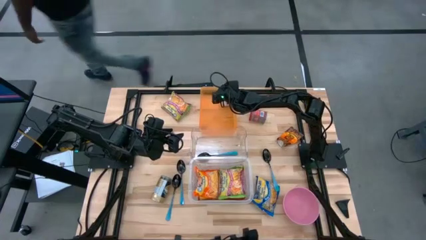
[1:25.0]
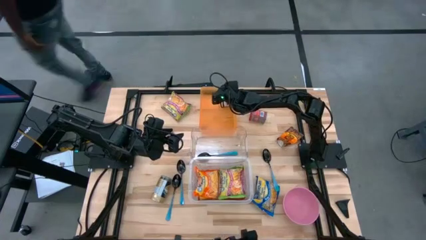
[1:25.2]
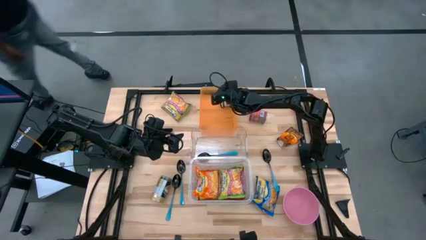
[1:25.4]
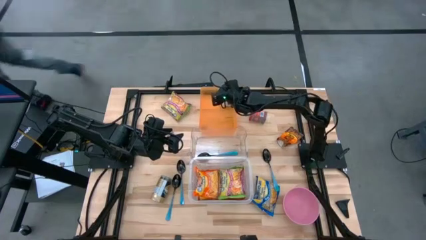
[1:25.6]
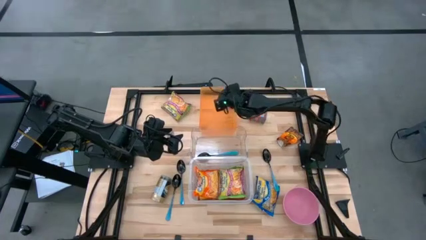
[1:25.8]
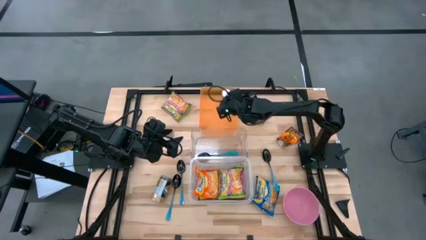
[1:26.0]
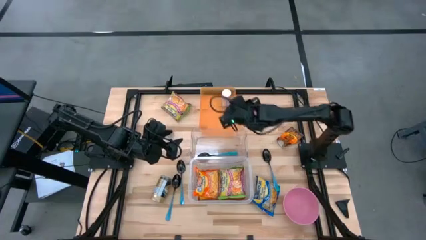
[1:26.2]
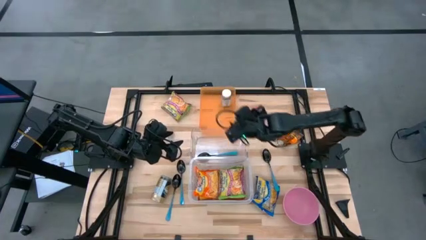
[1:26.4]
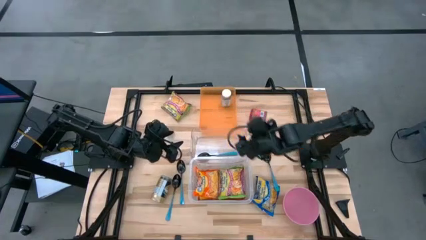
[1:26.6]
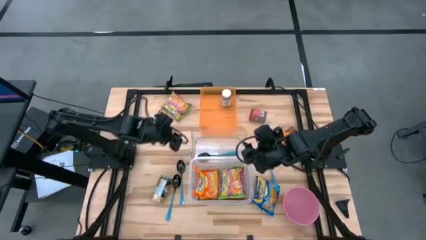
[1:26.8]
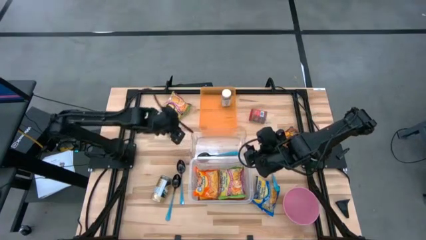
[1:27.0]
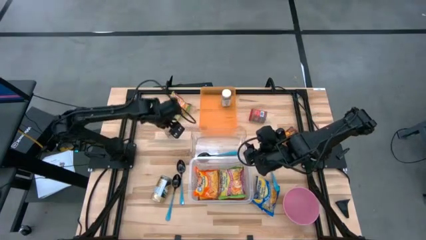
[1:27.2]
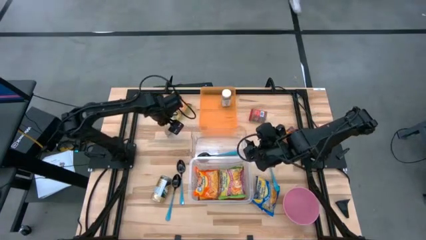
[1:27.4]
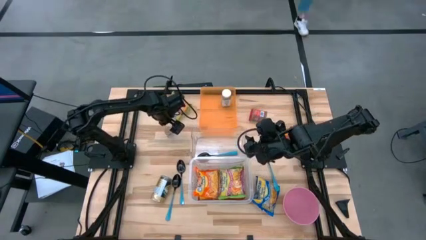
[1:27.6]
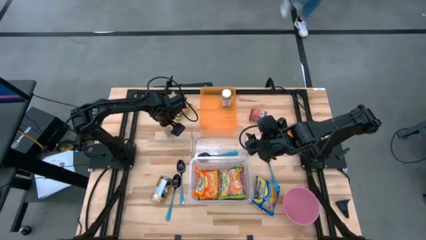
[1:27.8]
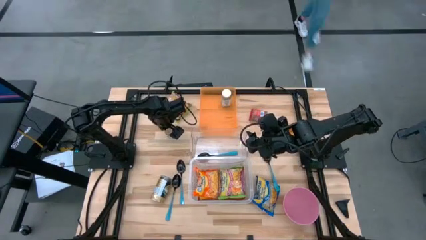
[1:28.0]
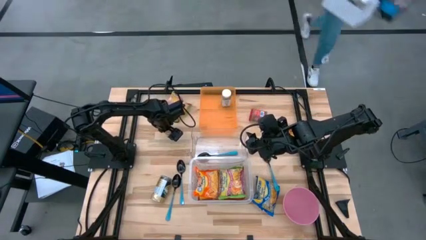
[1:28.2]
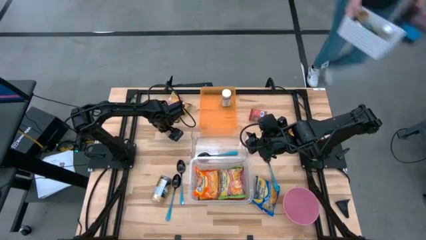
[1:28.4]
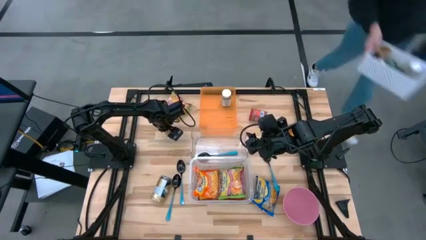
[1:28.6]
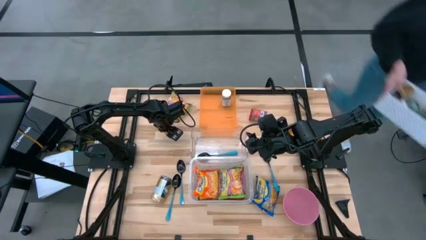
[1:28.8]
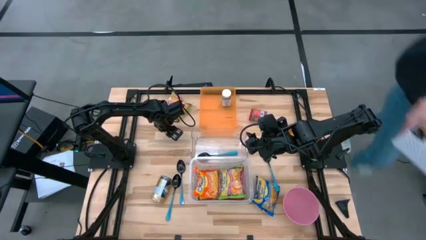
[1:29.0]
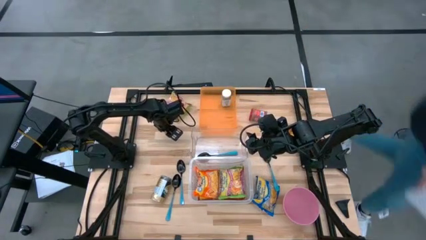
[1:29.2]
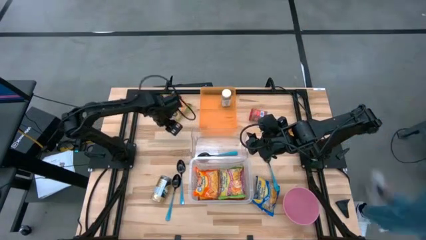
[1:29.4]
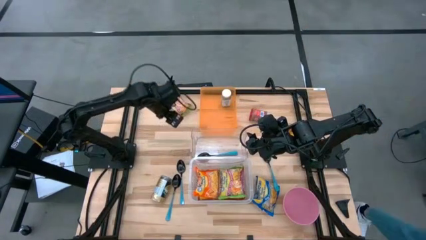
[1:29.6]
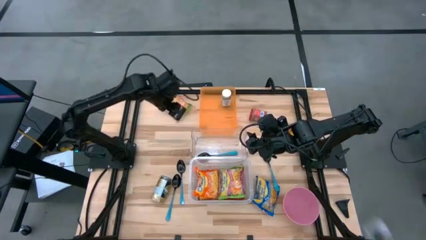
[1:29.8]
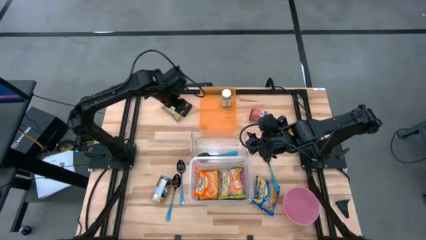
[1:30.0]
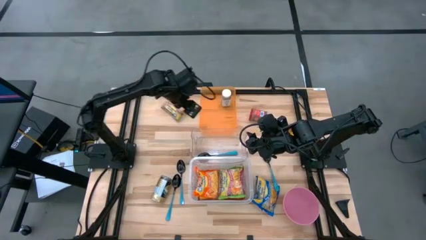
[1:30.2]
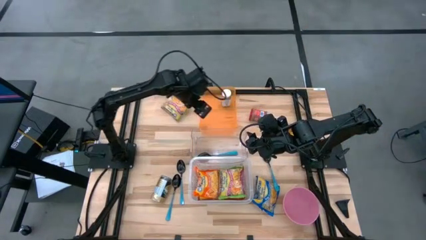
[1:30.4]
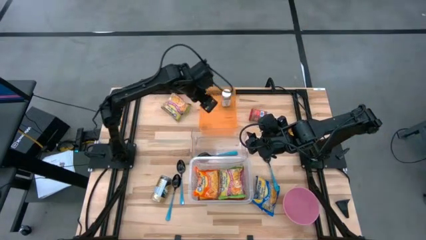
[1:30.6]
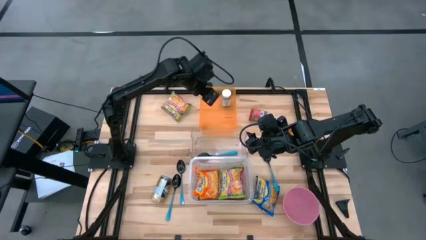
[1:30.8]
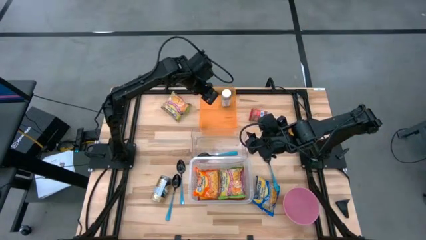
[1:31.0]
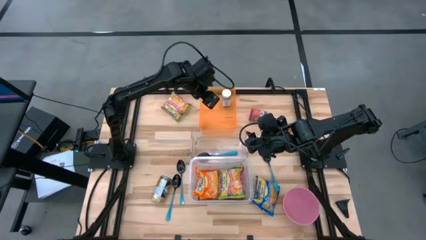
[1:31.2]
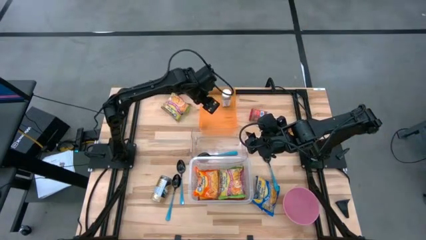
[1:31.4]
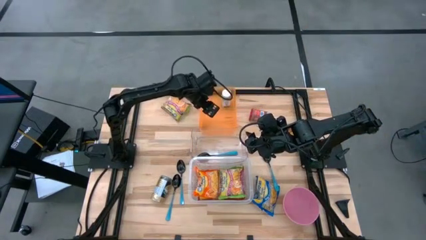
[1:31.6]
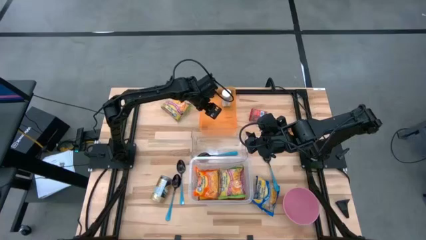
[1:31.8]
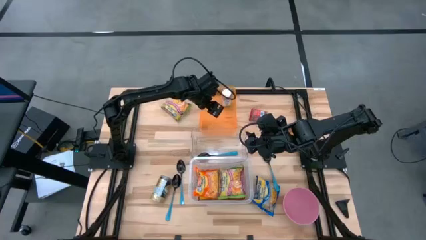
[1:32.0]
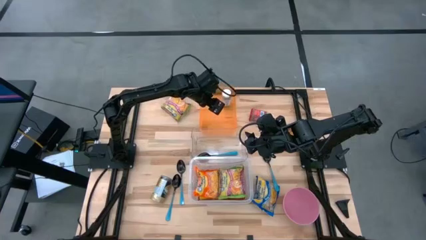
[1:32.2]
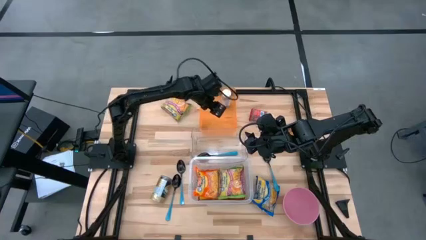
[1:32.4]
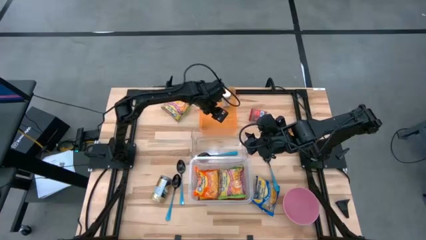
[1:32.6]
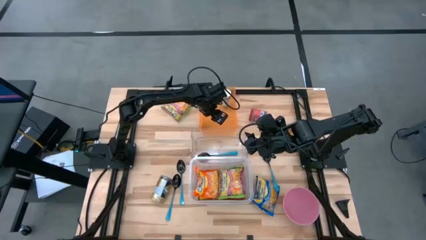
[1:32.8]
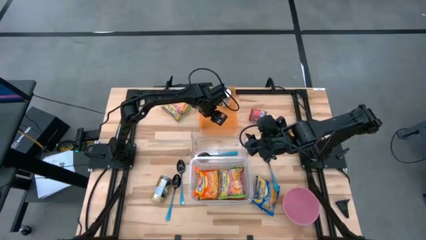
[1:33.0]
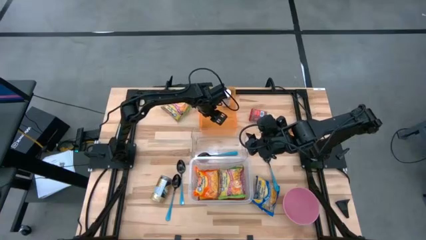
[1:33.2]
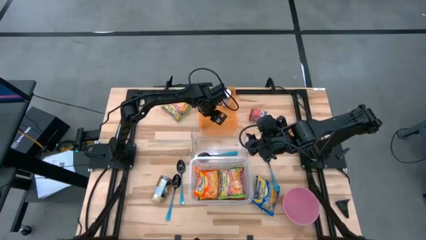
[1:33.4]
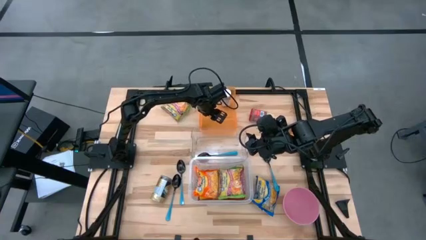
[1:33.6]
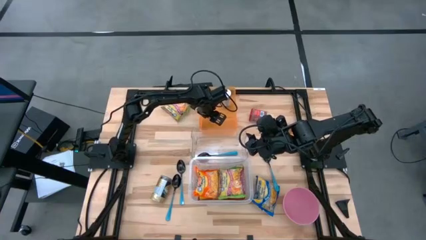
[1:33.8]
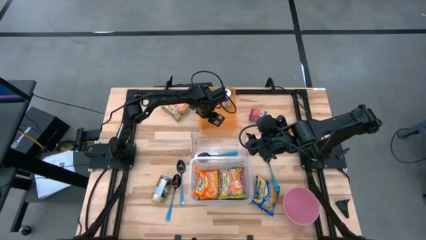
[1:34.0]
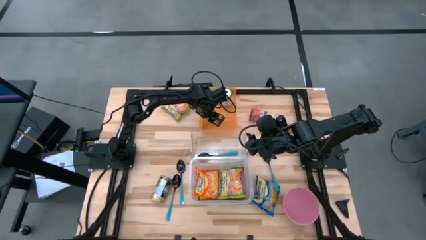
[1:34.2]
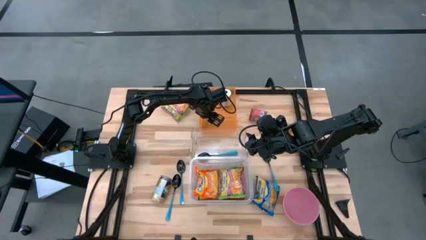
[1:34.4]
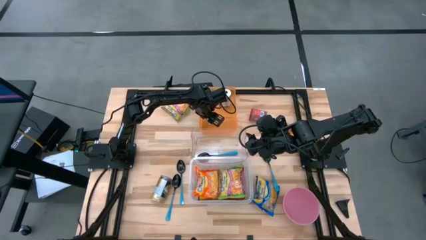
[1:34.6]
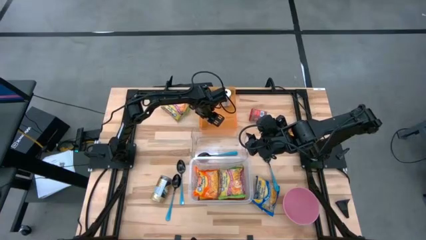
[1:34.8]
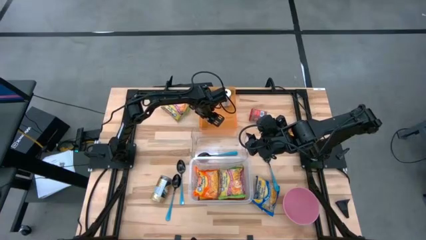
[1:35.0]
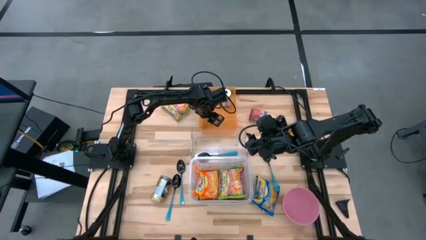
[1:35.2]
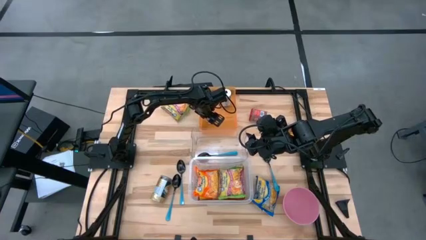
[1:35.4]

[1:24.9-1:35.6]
Task: Pick & Place Food Item
Put the brown seasoning bottle into the orange transparent bin

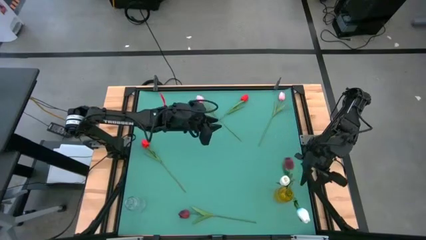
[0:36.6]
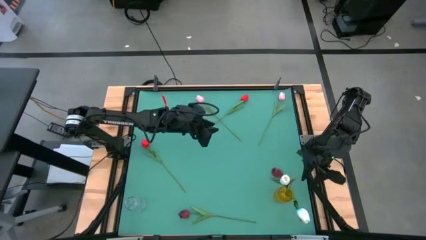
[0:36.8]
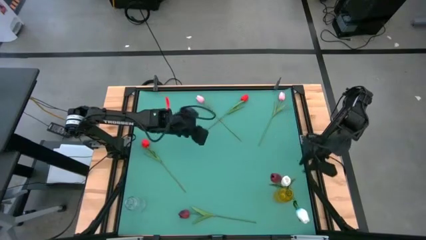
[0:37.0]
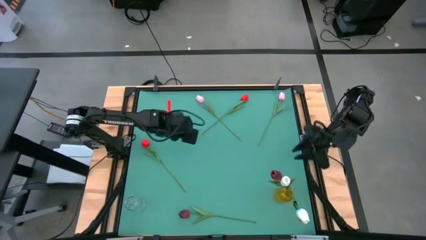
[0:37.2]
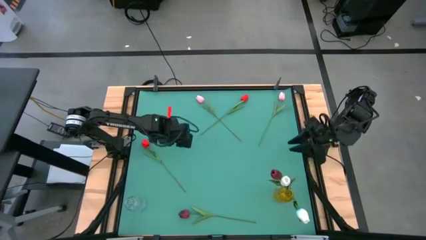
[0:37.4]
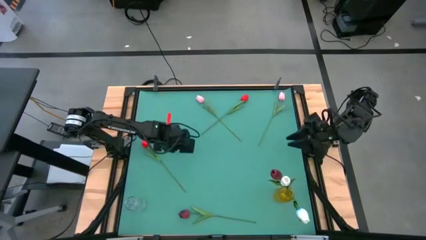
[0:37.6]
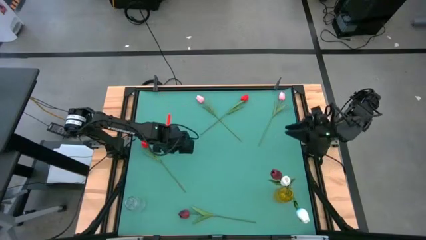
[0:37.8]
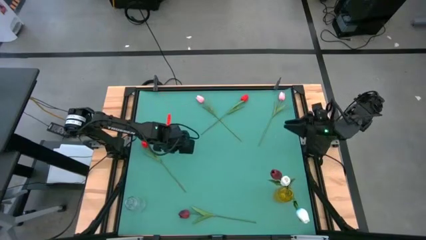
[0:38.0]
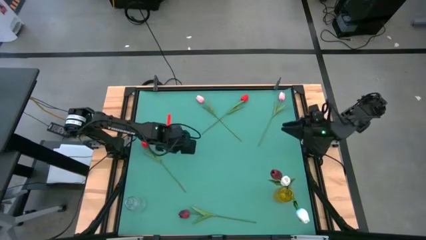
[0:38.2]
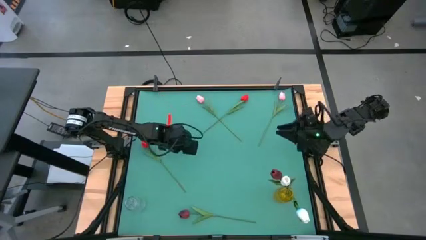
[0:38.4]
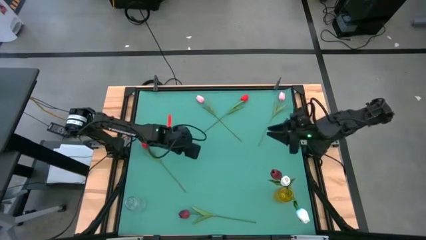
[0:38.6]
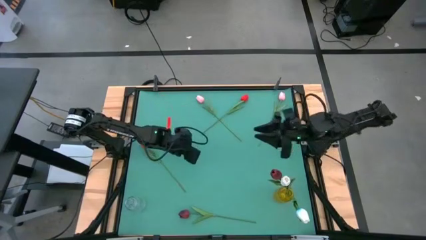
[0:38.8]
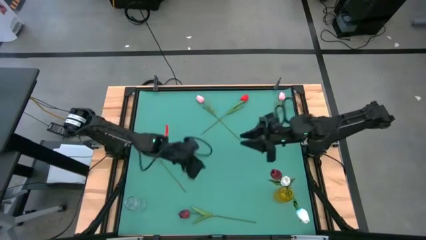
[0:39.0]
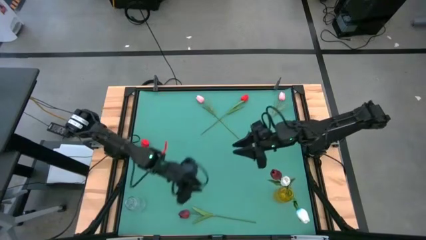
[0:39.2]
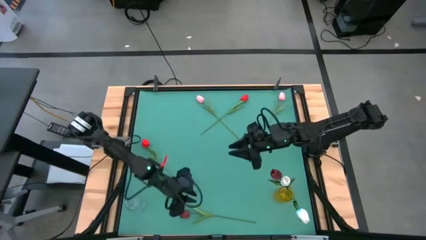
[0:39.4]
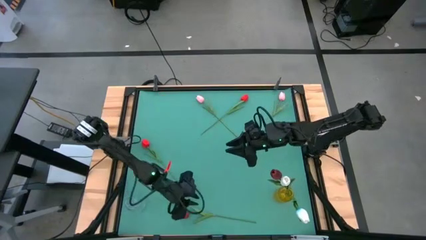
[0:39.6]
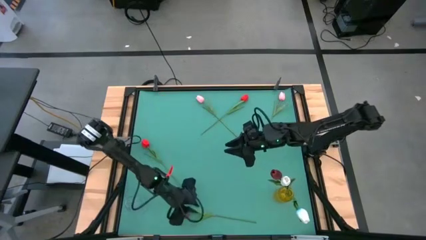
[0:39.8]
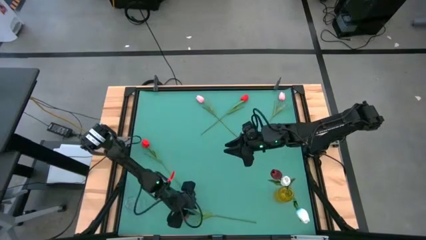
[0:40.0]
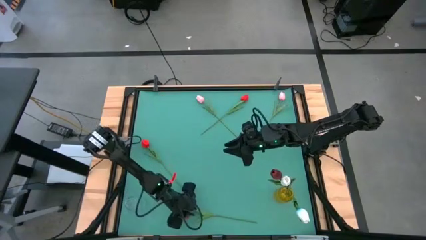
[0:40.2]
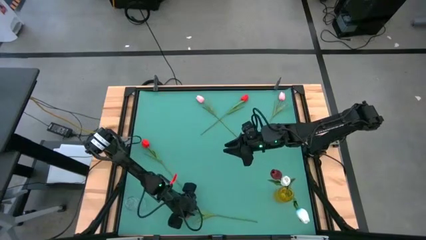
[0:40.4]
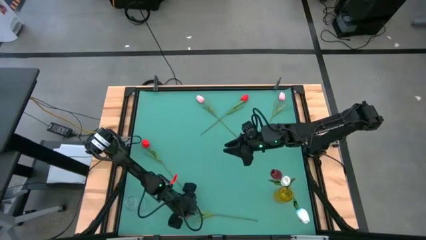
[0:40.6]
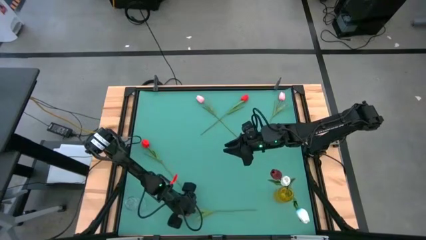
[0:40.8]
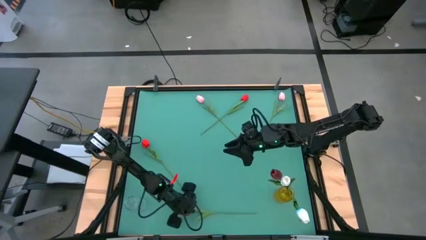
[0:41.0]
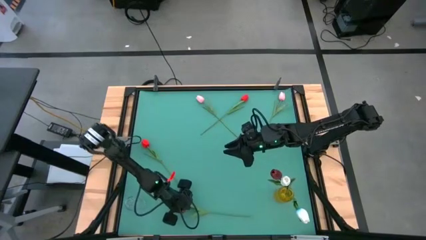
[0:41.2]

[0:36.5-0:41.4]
Task: Sort flowers into vase by color
Put the dark red tulip into the yellow flower vase

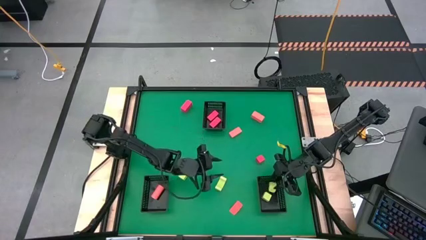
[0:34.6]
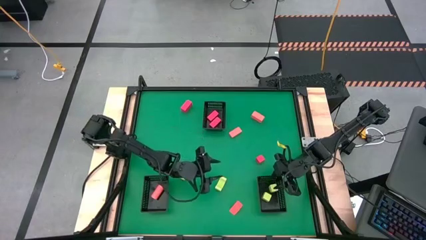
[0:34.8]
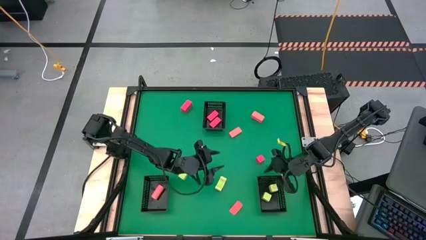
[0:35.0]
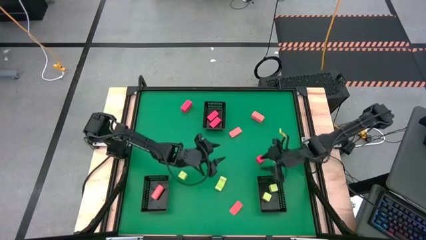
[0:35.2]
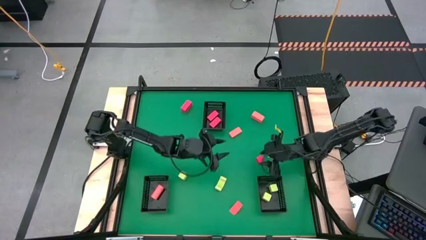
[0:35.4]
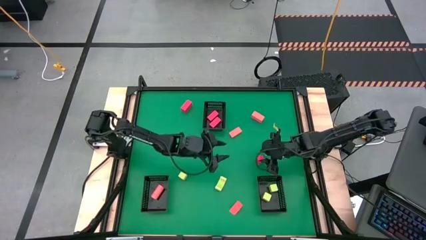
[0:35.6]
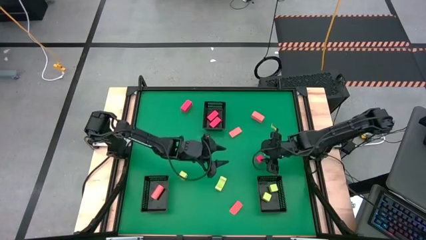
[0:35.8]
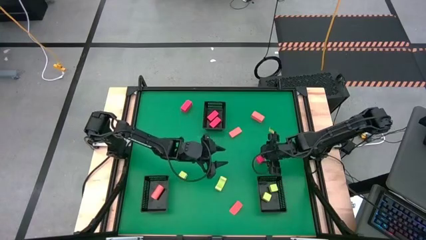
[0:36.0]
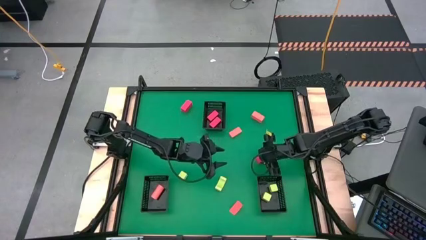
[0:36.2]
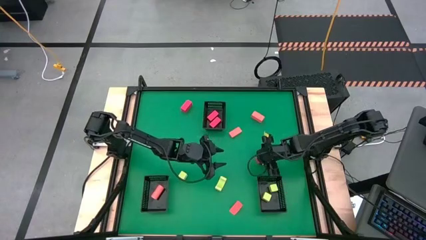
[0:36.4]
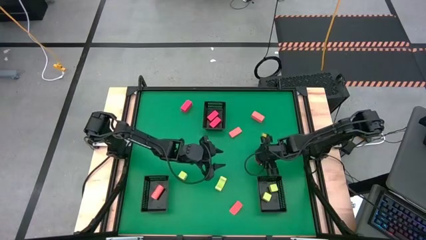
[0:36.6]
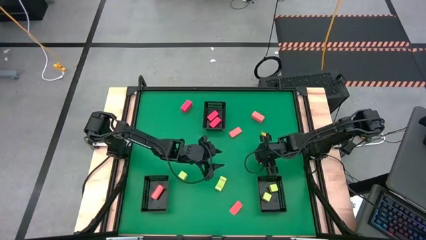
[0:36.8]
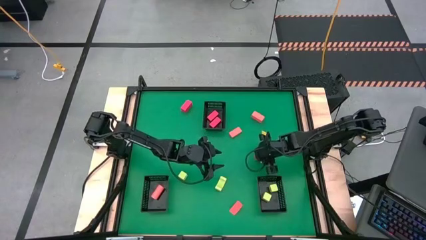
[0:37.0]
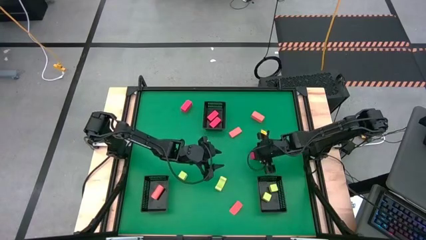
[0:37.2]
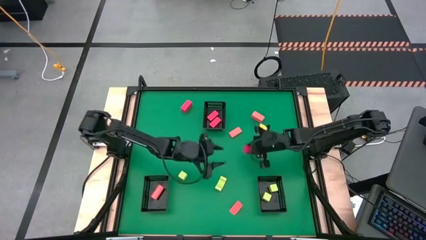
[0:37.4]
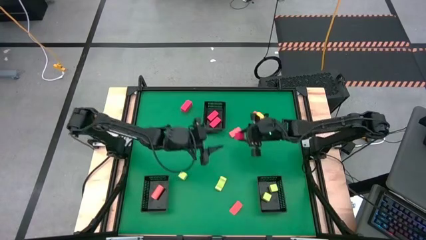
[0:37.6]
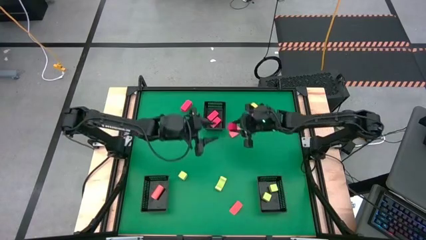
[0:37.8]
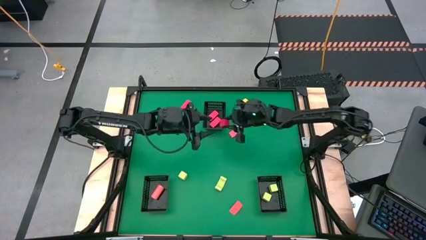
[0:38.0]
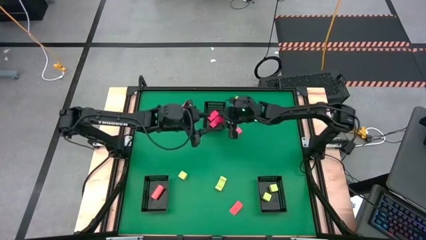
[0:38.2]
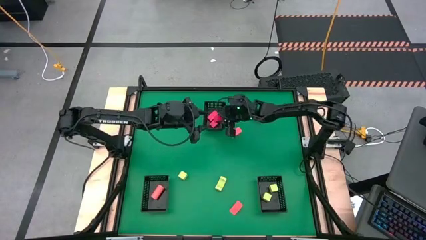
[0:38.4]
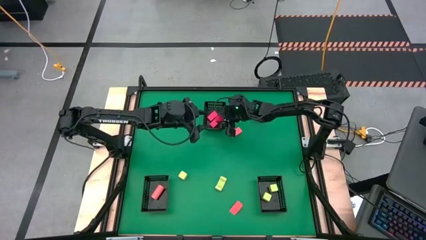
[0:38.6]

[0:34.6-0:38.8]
Task: Sort & place blocks by color
Put the red block into the top black bin
